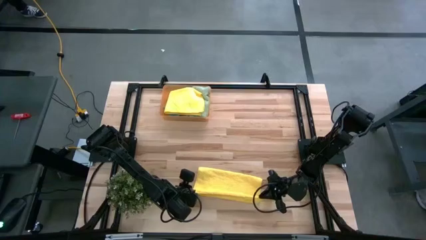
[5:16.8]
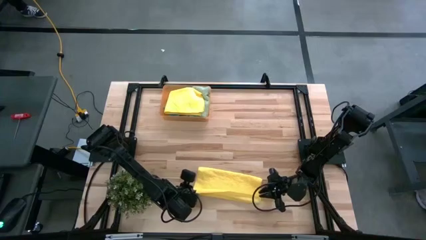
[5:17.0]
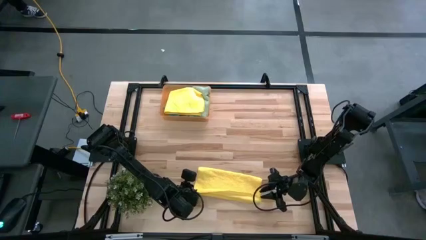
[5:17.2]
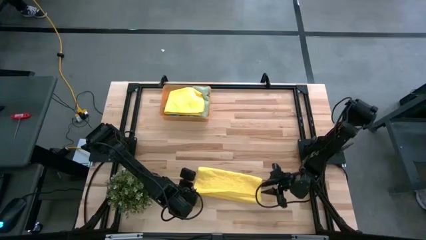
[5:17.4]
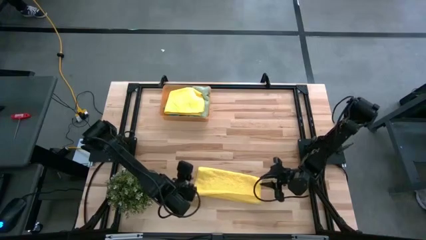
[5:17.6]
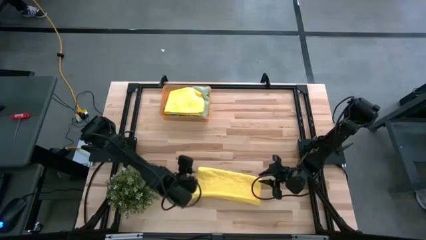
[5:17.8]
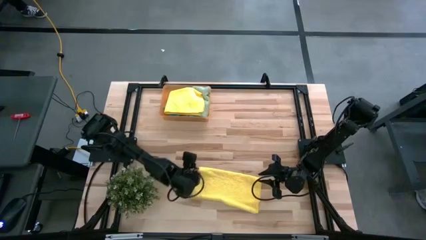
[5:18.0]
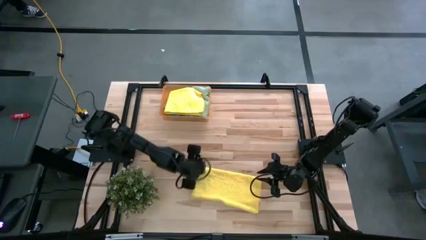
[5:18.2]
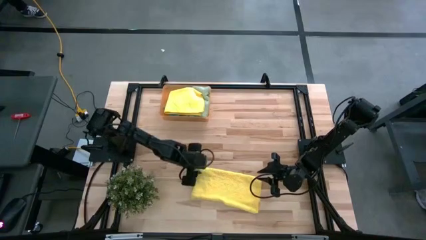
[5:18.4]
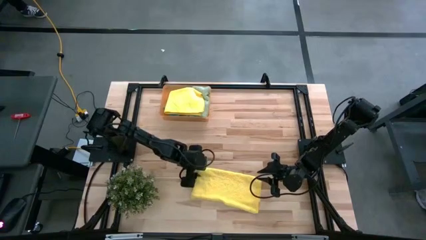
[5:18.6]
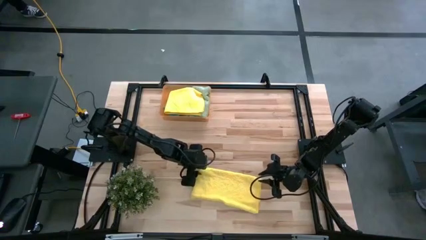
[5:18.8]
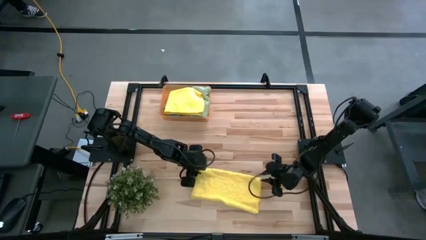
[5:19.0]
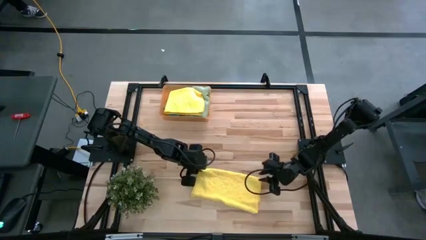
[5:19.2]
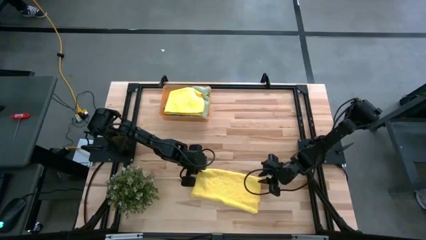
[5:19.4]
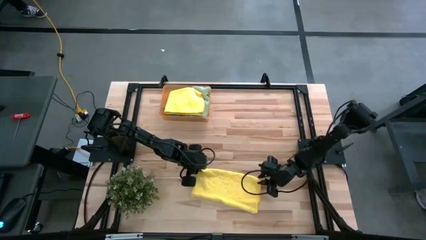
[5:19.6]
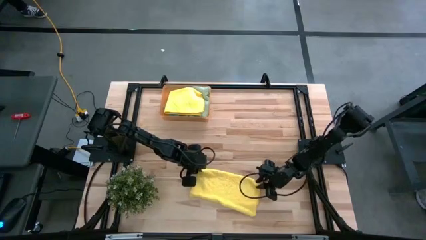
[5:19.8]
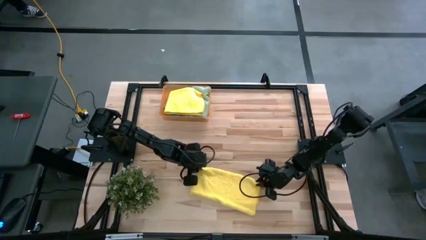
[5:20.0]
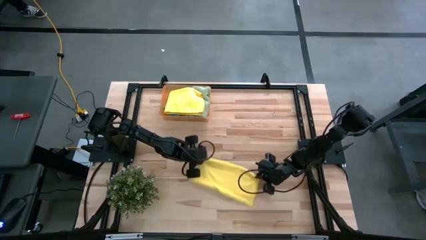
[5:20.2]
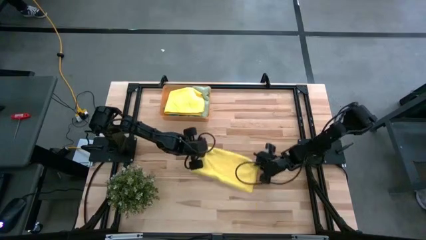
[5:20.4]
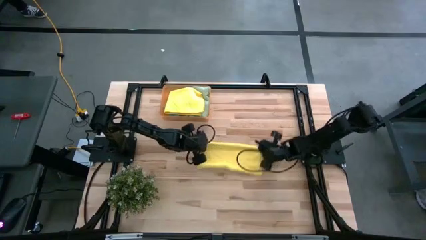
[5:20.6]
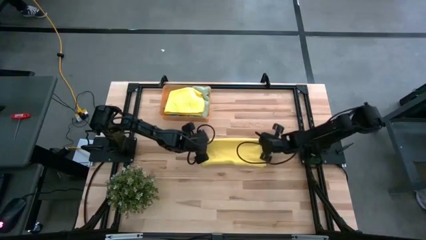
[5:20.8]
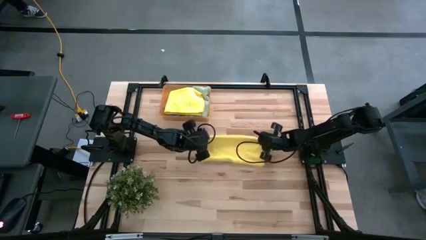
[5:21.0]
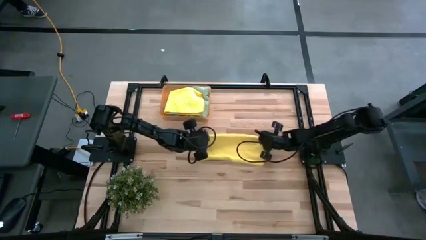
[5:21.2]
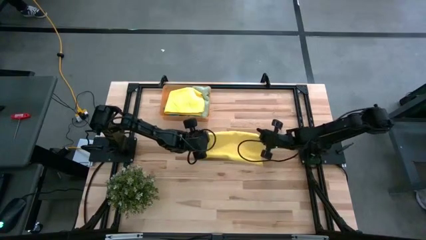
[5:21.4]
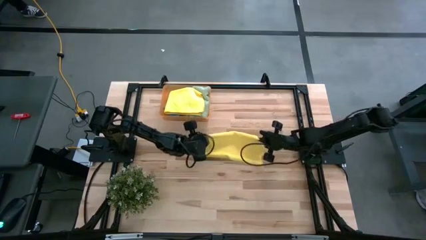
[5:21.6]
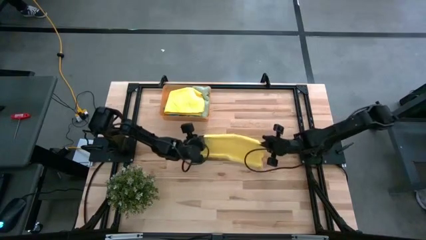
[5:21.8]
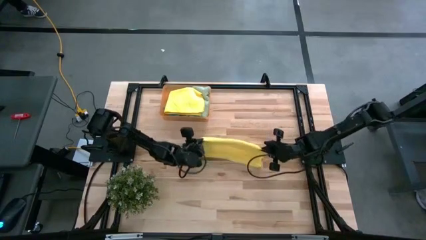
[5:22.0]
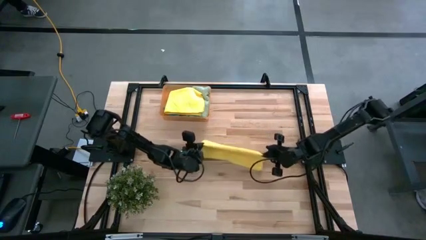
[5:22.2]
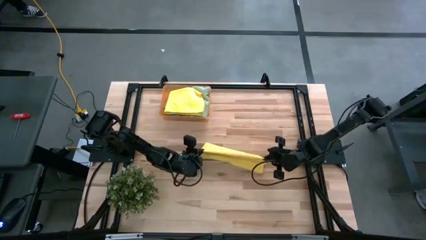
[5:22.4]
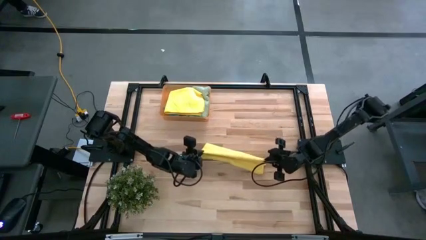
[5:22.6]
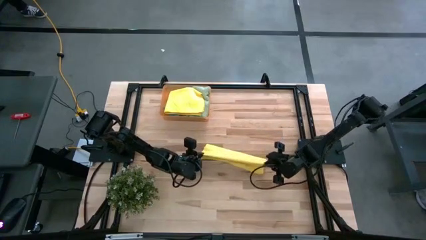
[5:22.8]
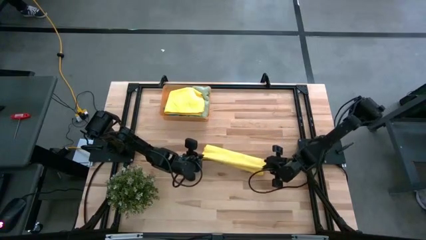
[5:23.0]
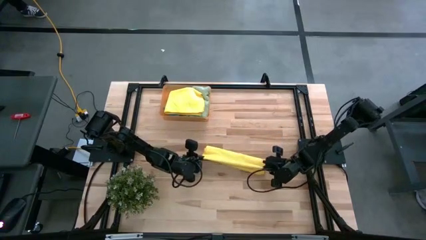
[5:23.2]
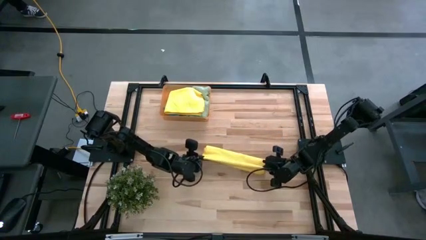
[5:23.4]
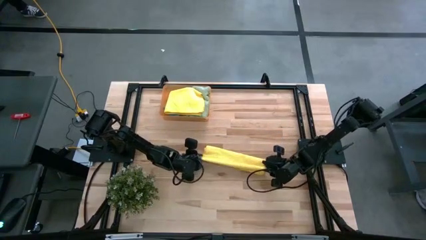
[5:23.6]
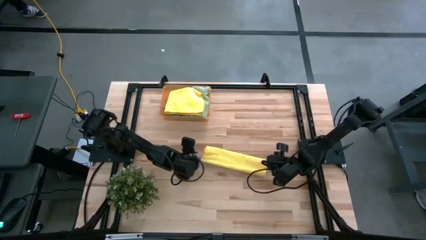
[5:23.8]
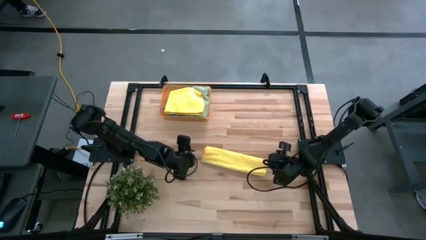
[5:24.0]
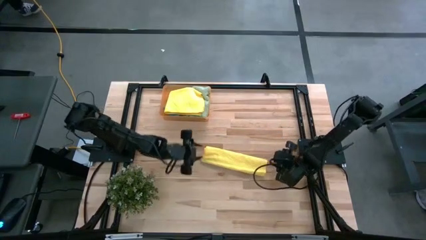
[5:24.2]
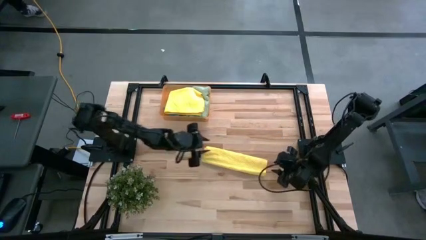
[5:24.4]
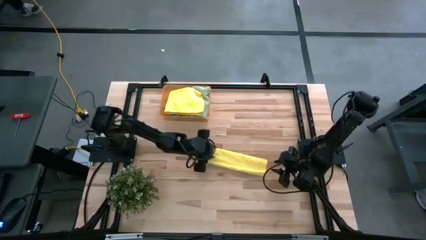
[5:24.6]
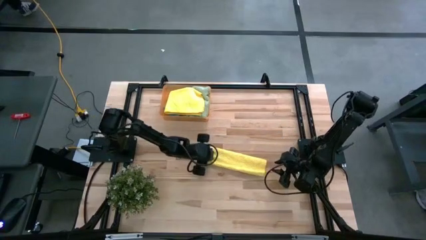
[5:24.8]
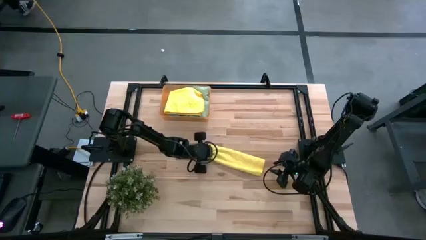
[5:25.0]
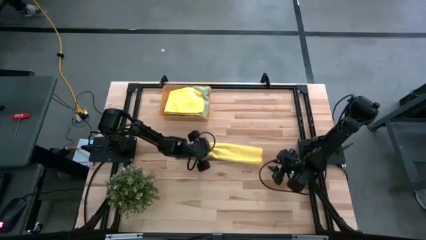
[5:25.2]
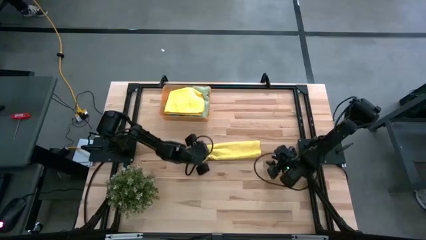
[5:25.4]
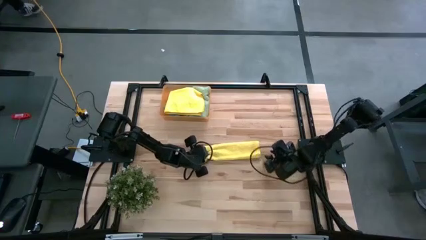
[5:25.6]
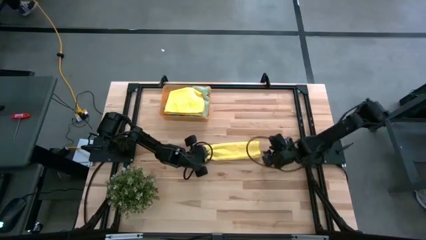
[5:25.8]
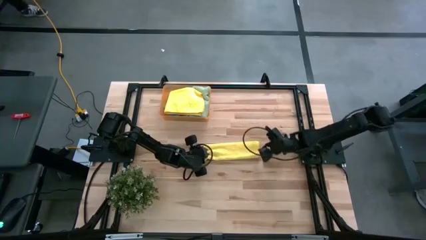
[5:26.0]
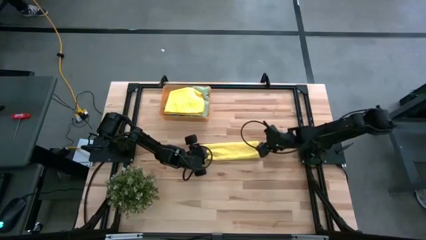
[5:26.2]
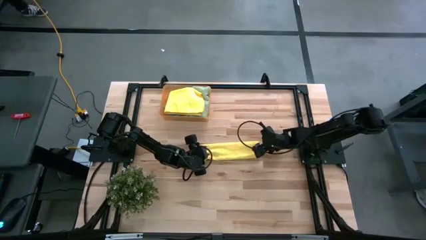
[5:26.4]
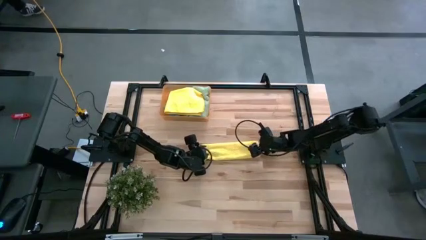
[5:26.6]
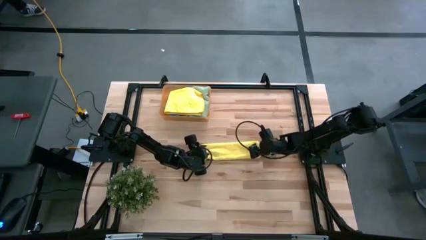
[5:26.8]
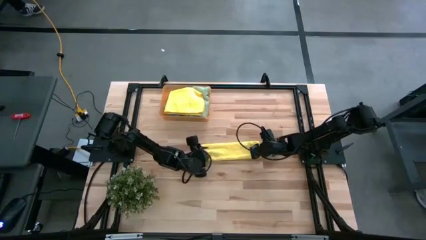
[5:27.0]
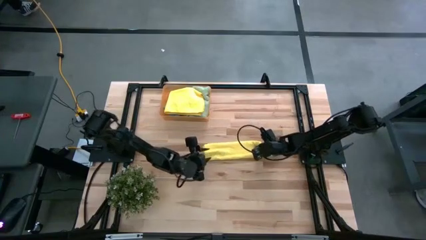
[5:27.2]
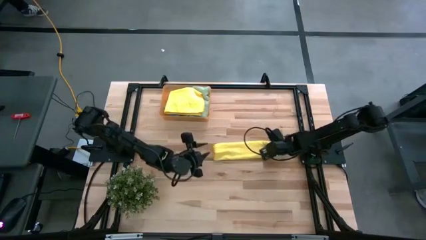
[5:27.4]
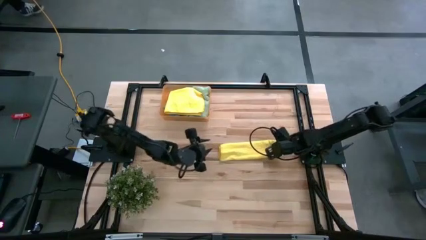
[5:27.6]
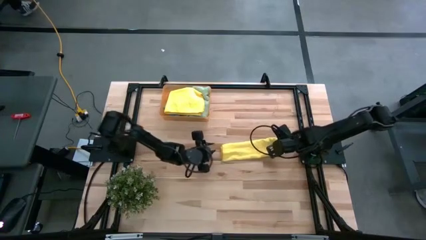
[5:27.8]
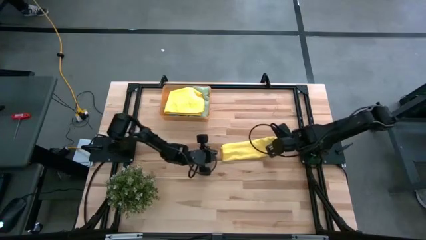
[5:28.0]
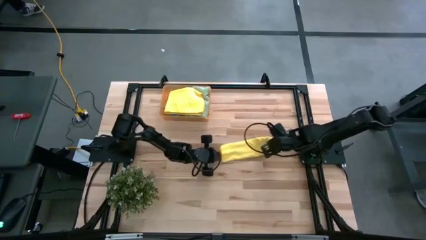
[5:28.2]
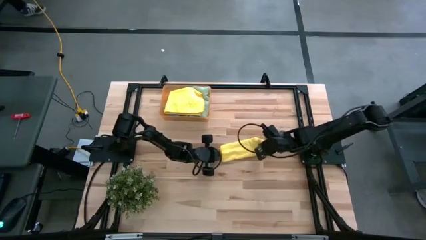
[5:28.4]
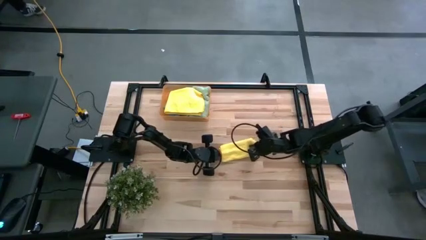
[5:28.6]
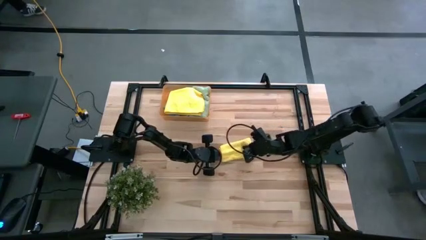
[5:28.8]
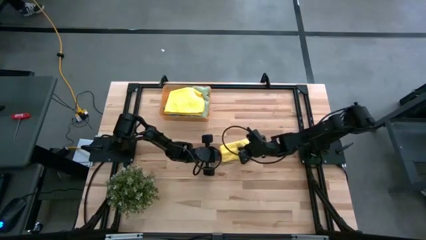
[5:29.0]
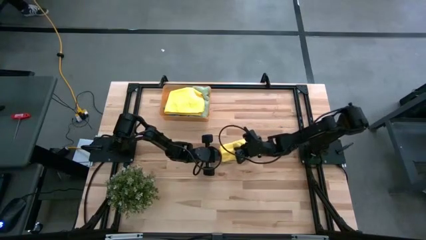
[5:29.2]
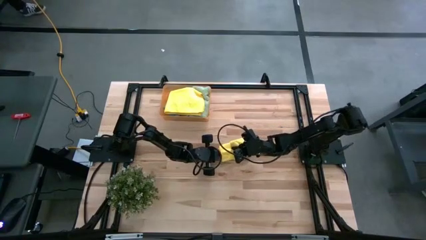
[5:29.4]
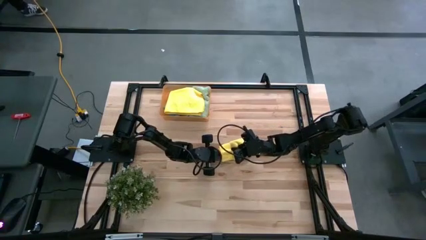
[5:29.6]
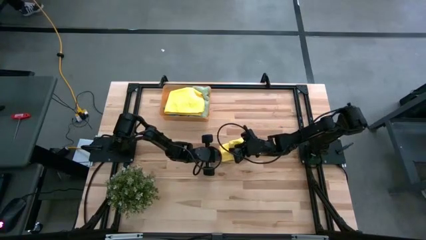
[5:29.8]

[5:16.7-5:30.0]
Task: Fold microfiber towels
Fold the yellow microfiber cloth
